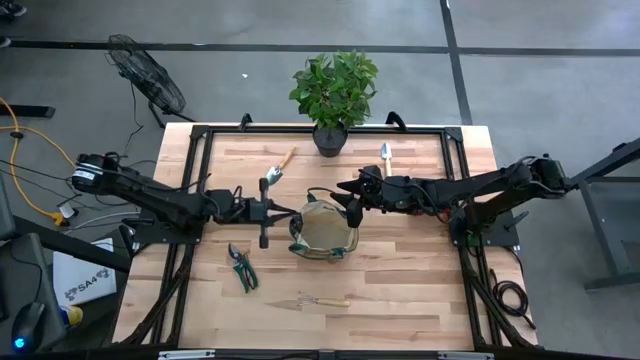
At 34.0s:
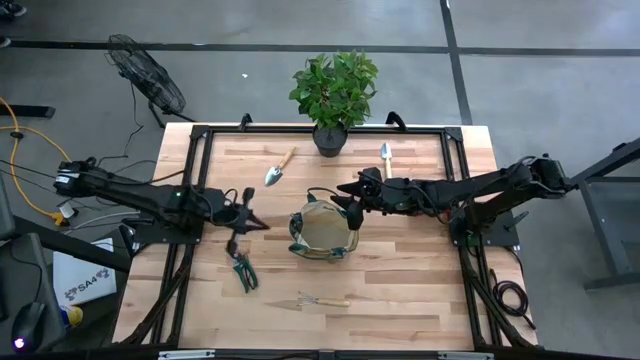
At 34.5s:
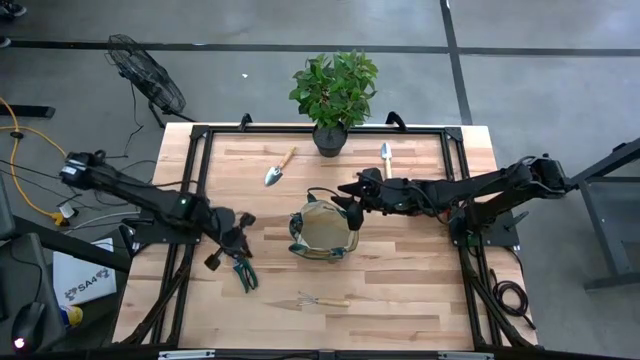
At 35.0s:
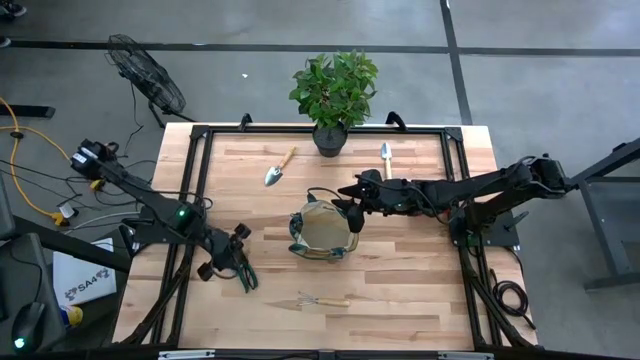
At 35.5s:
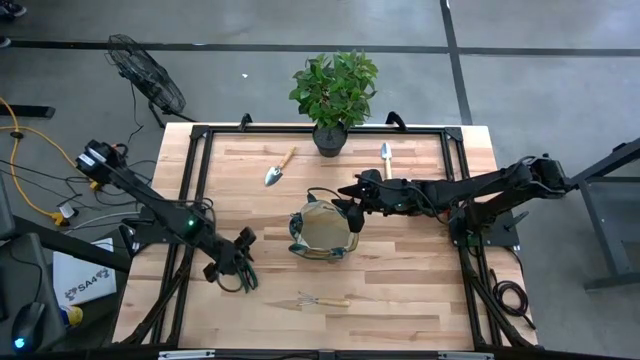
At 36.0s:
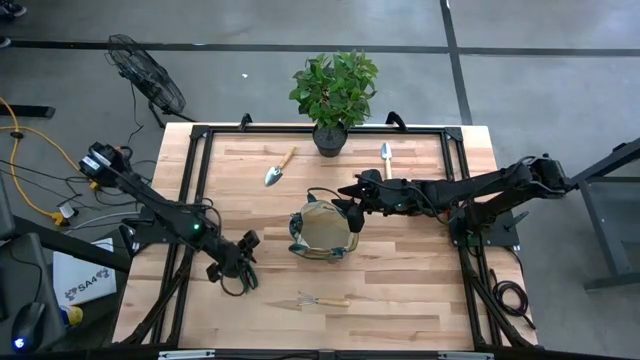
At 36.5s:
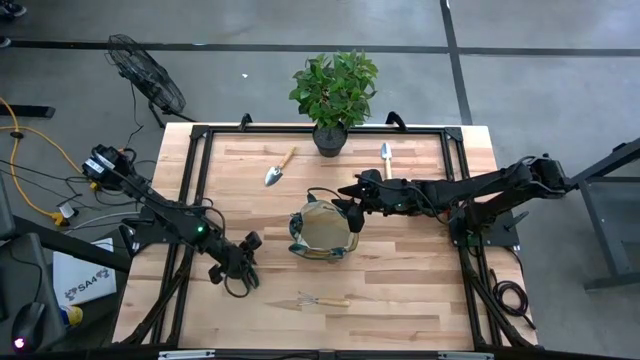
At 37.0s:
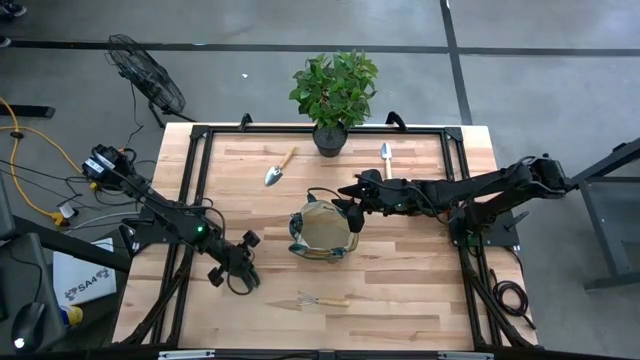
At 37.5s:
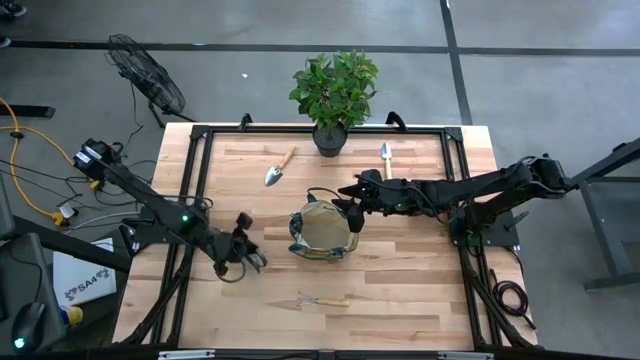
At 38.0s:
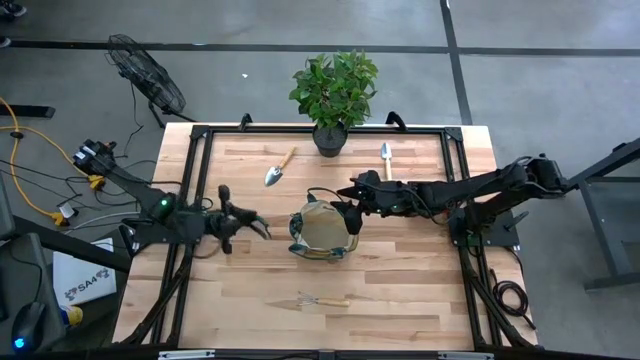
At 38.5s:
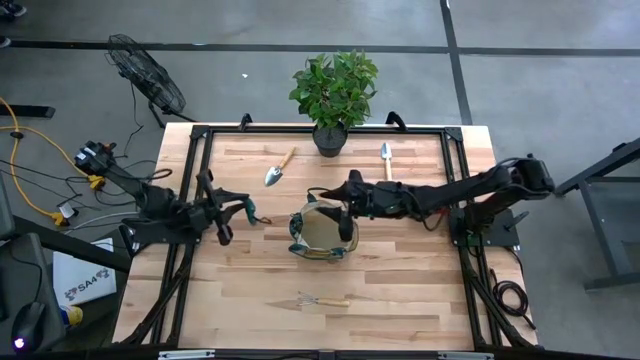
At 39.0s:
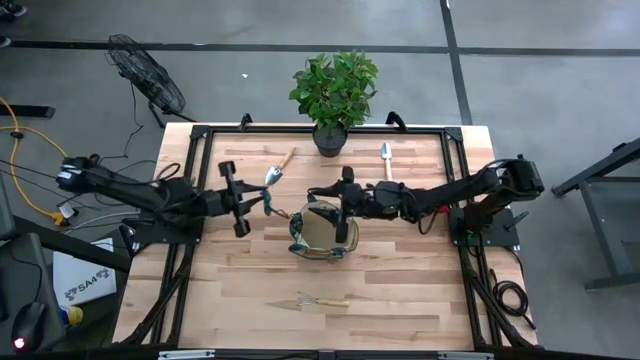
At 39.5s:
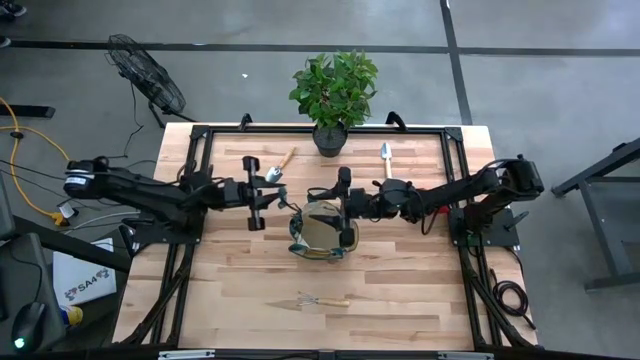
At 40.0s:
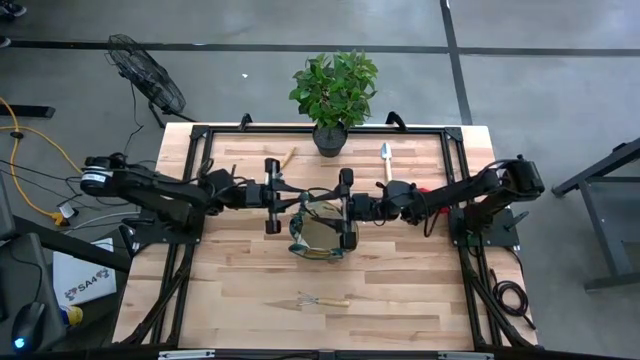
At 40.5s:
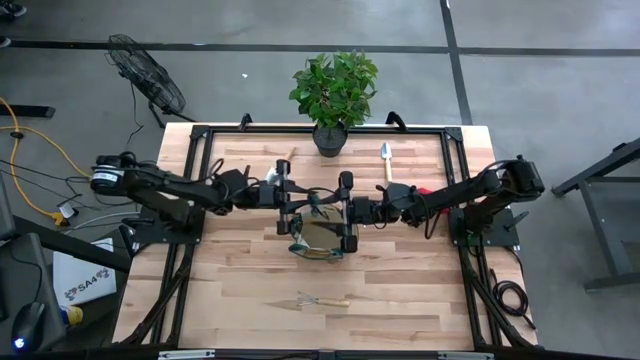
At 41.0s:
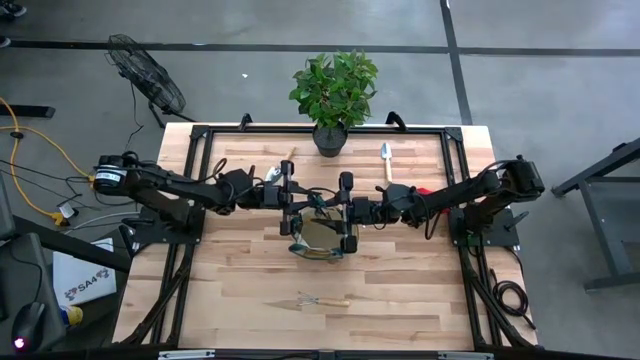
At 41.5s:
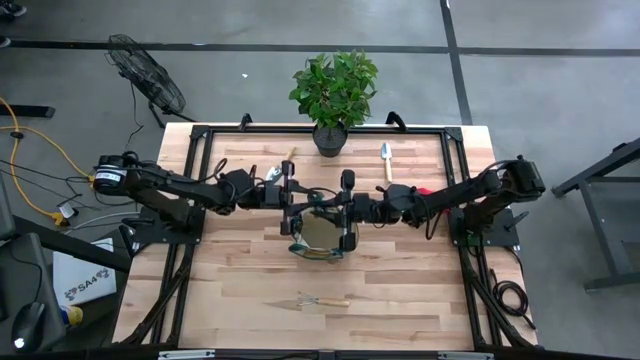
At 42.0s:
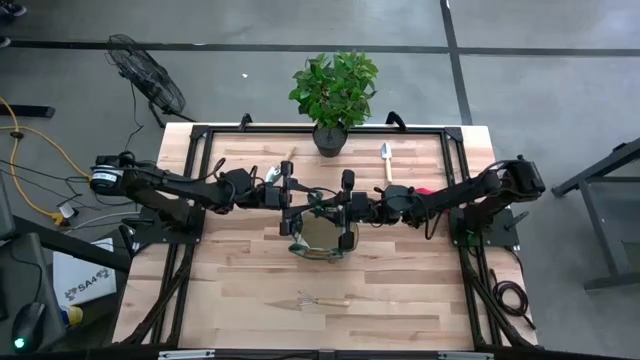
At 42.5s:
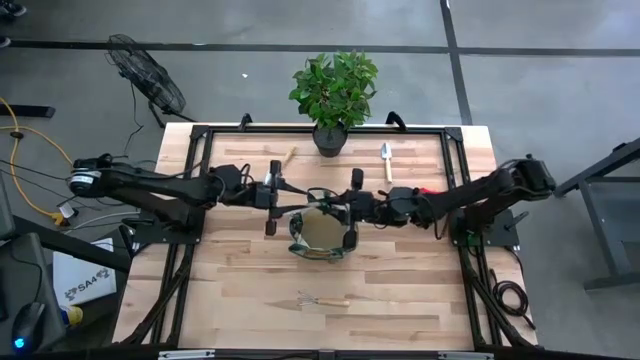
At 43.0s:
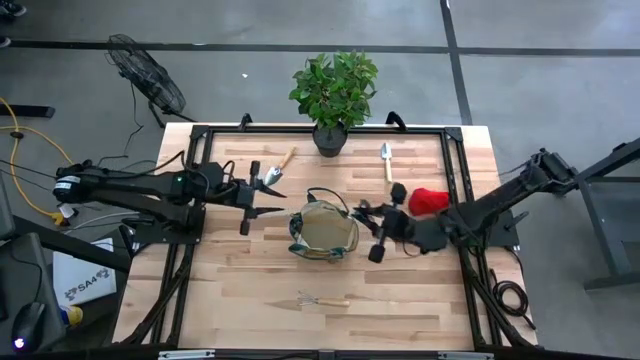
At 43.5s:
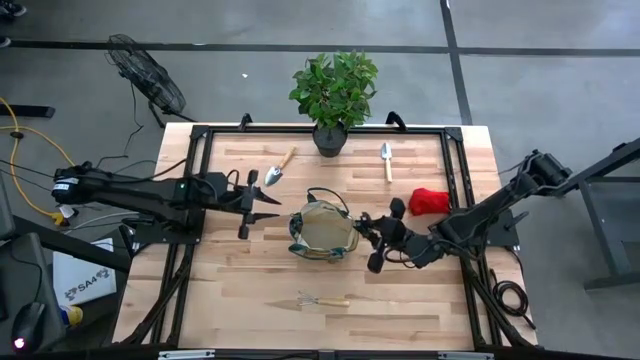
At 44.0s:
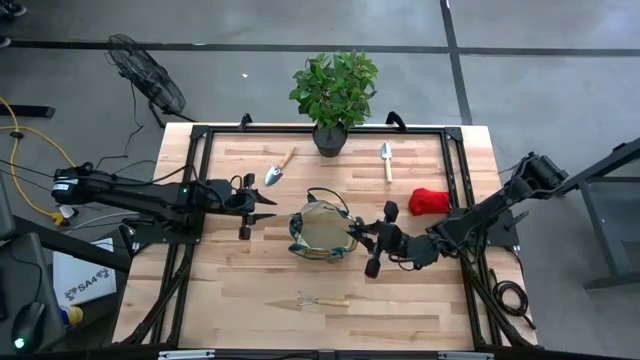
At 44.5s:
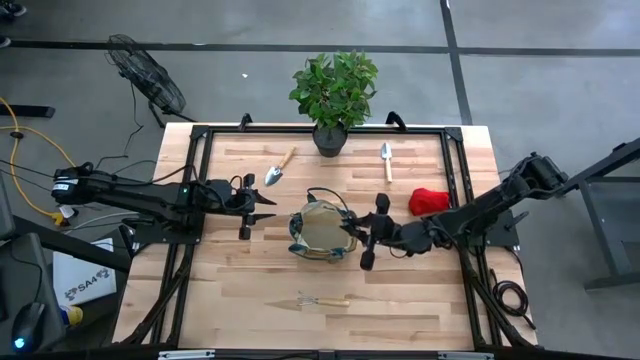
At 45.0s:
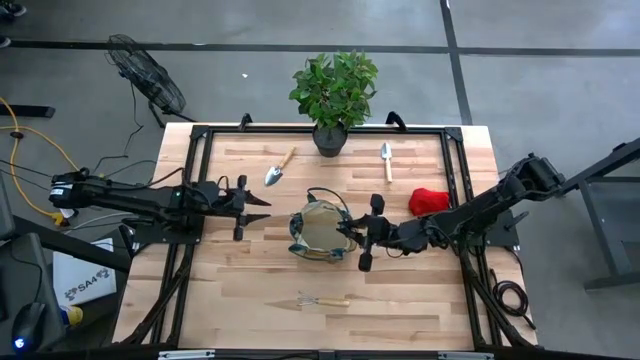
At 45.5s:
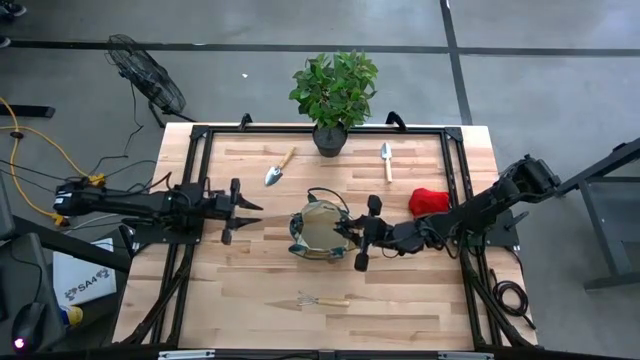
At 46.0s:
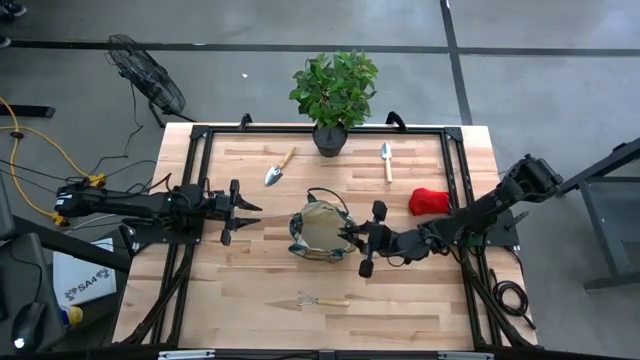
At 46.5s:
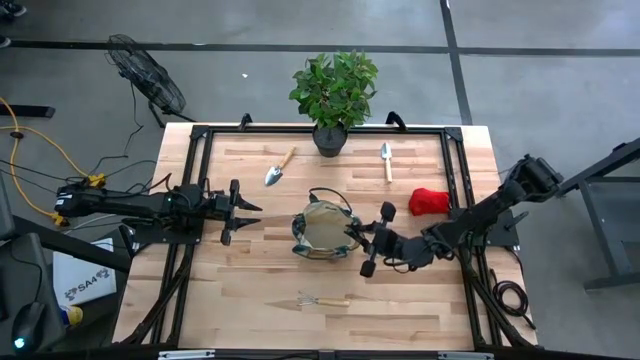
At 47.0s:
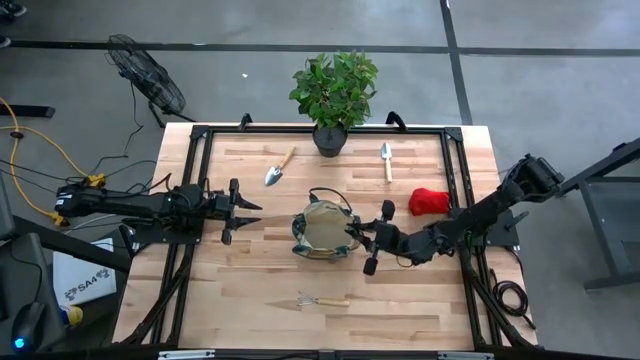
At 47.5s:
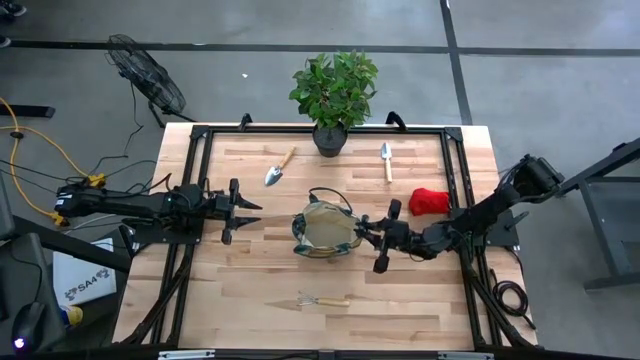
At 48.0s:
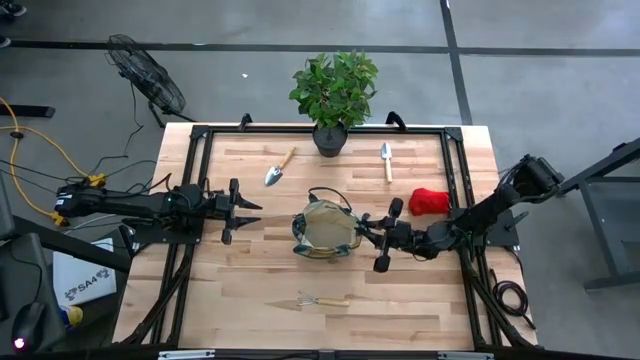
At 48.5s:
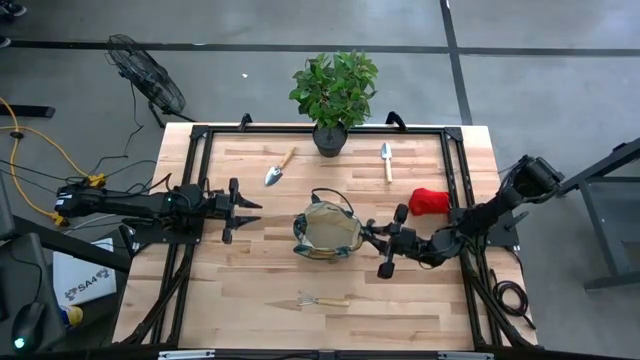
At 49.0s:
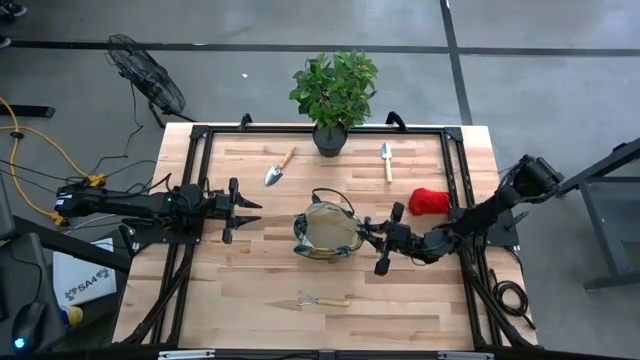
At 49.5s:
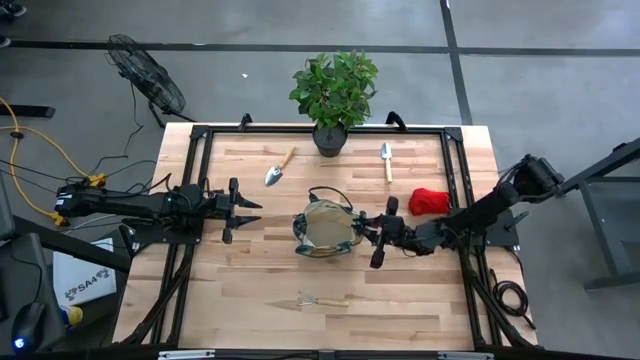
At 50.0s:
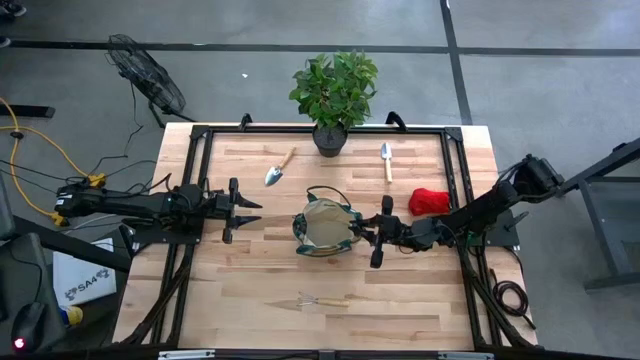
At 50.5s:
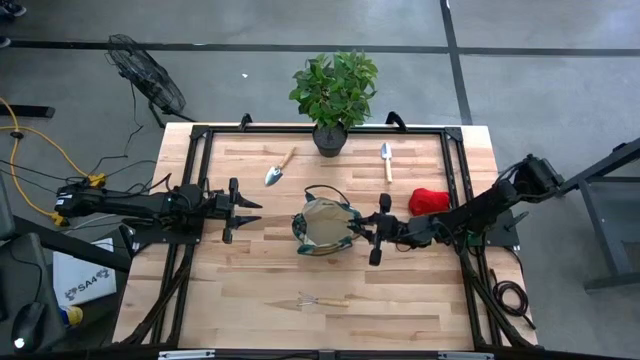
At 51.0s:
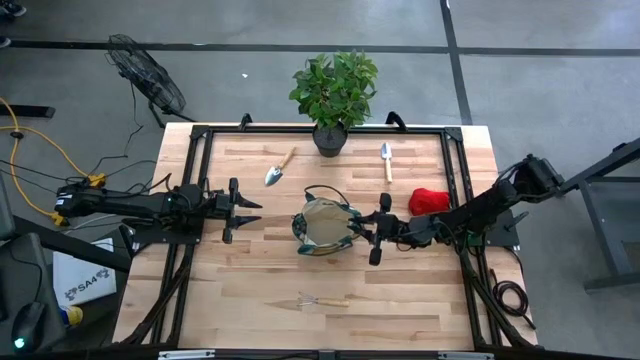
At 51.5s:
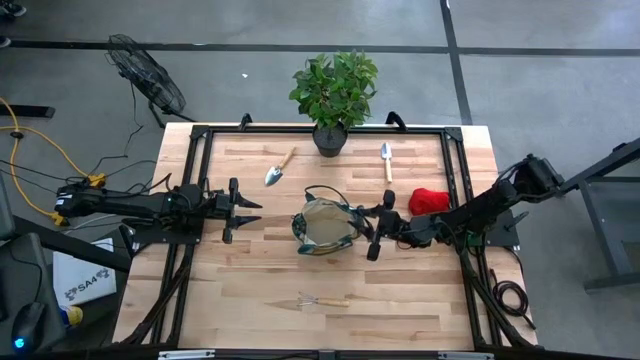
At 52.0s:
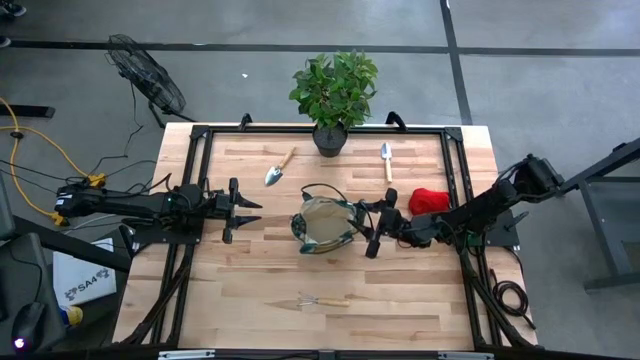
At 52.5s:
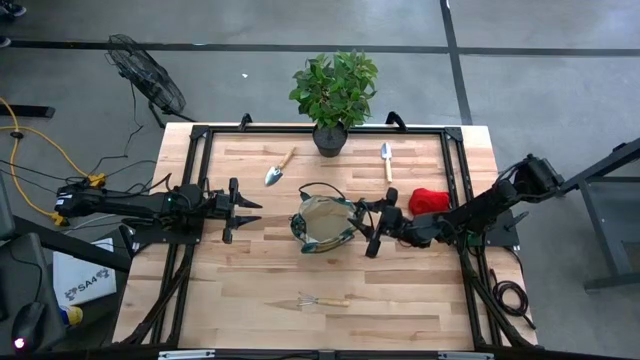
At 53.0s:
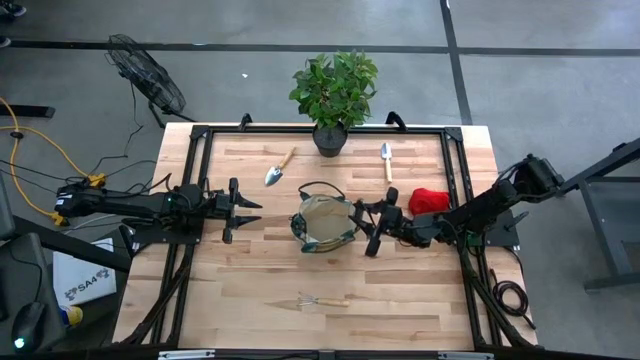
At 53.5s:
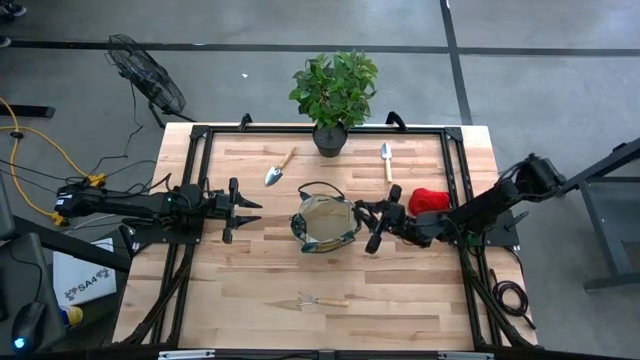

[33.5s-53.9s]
Task: Pick & Place Garden tools in Gardening bag
Put the green shear scissors into the gardening bag
